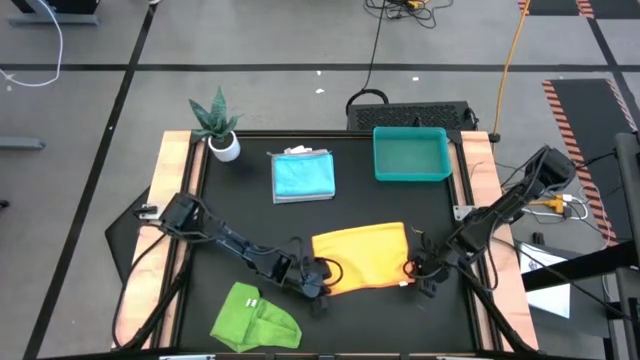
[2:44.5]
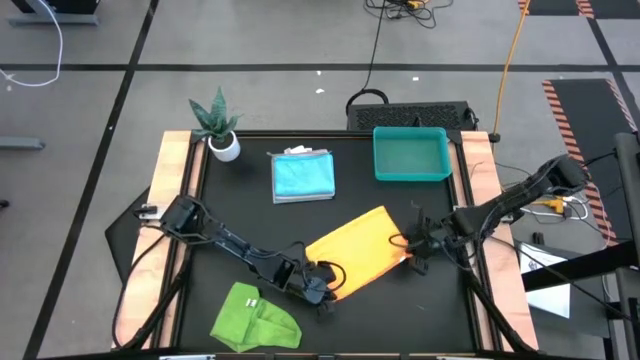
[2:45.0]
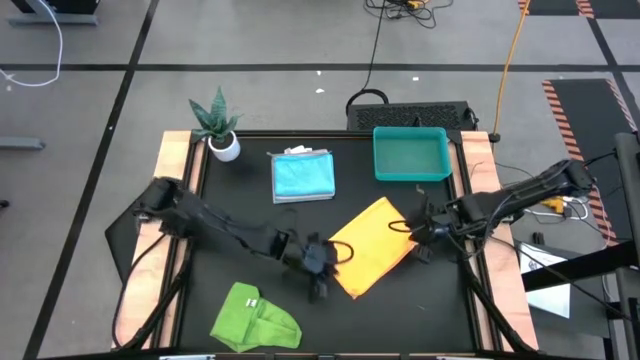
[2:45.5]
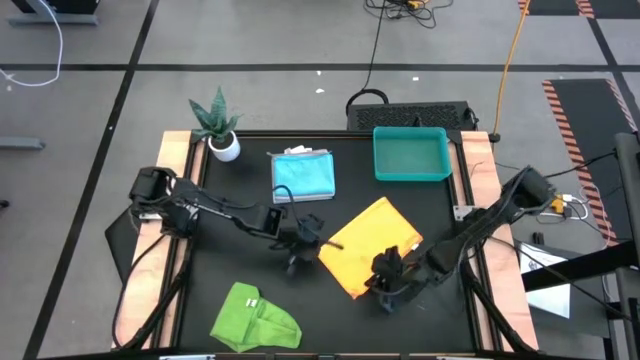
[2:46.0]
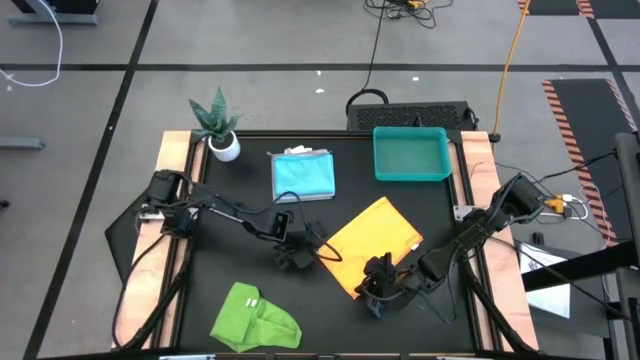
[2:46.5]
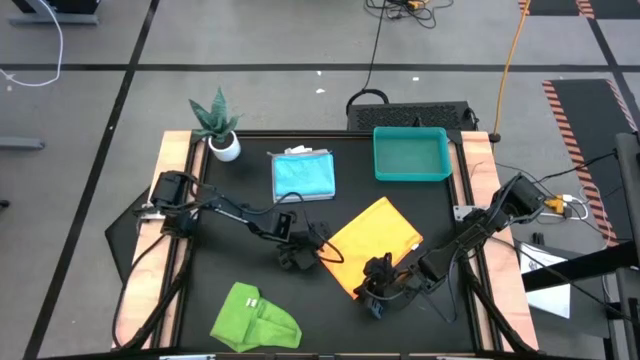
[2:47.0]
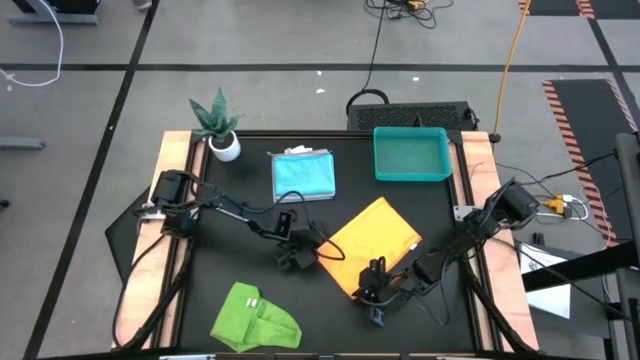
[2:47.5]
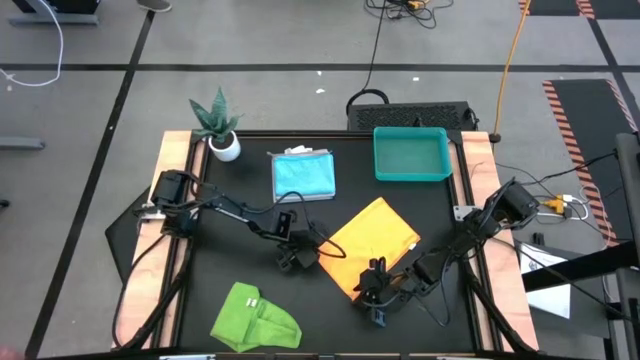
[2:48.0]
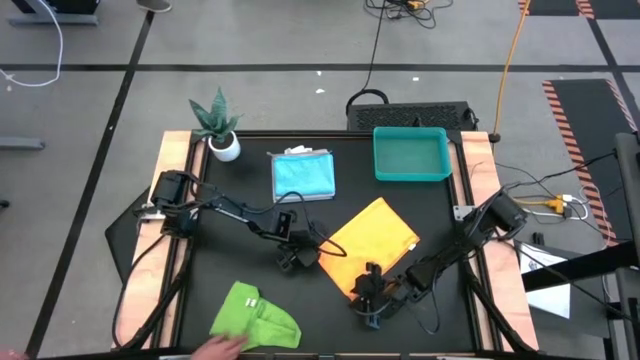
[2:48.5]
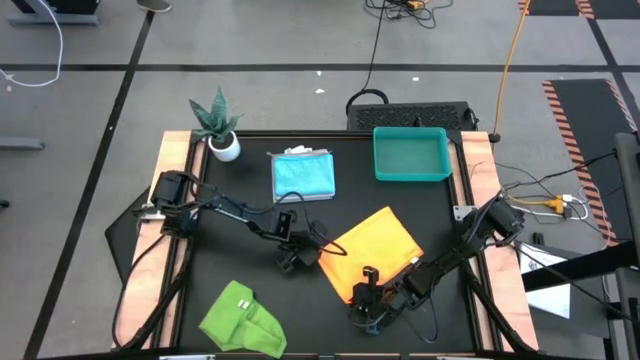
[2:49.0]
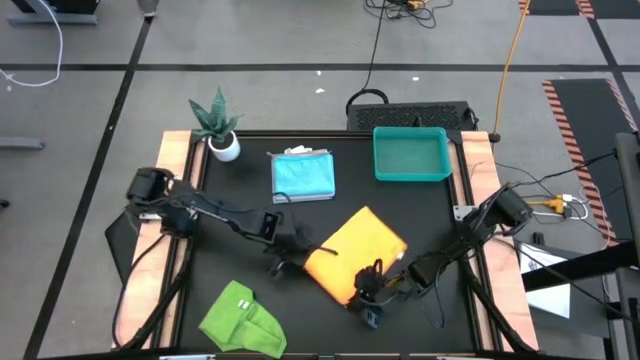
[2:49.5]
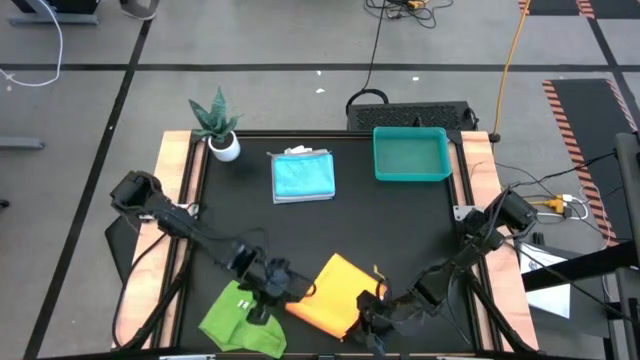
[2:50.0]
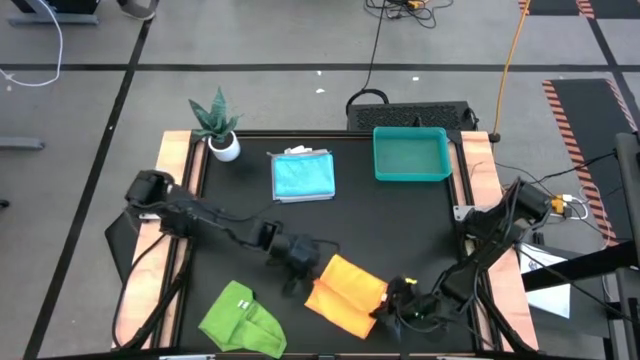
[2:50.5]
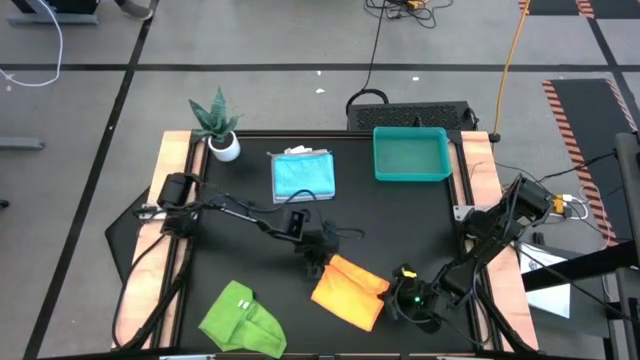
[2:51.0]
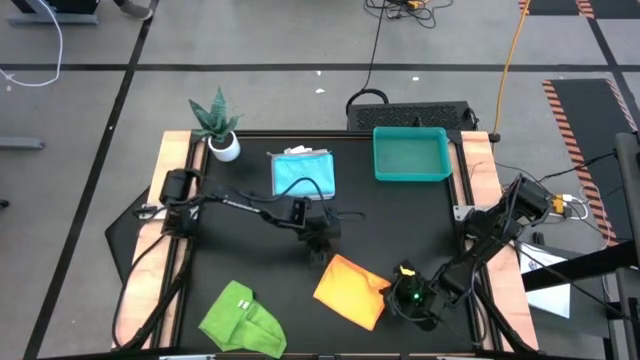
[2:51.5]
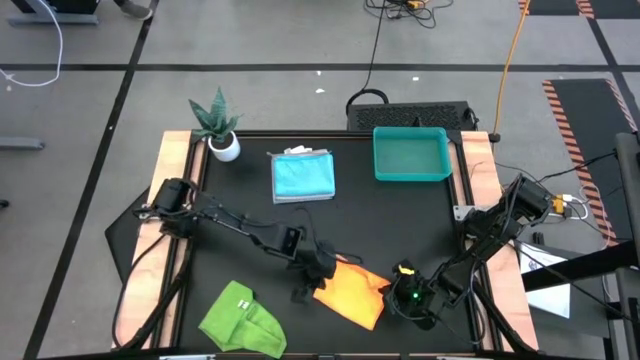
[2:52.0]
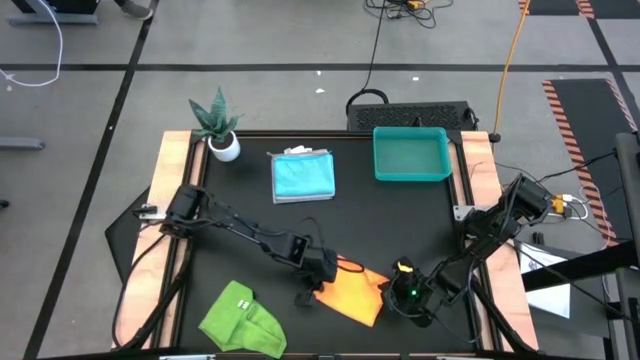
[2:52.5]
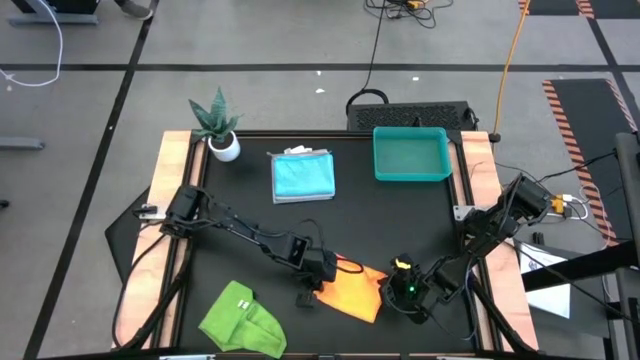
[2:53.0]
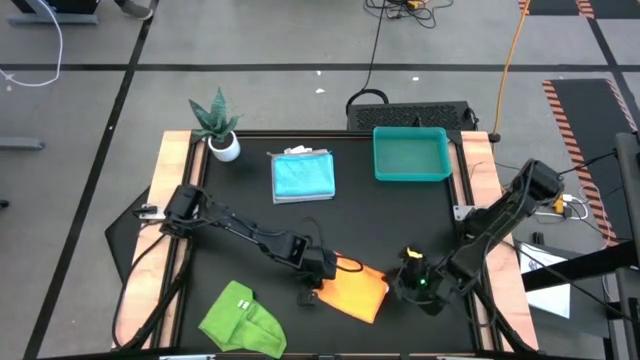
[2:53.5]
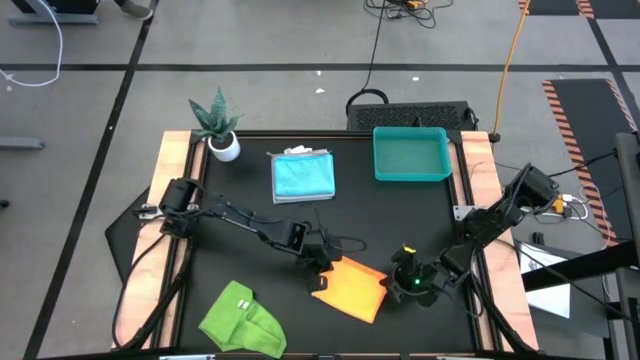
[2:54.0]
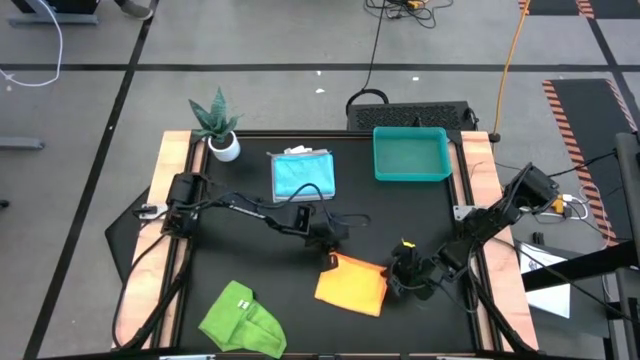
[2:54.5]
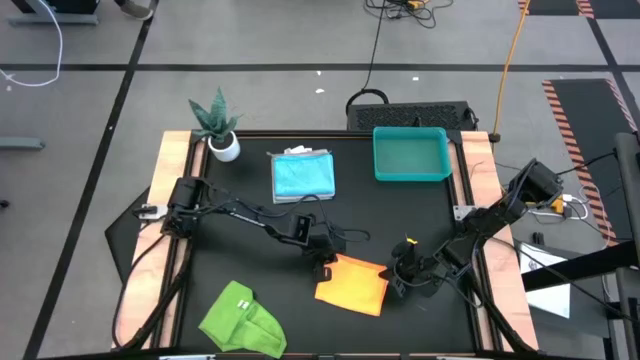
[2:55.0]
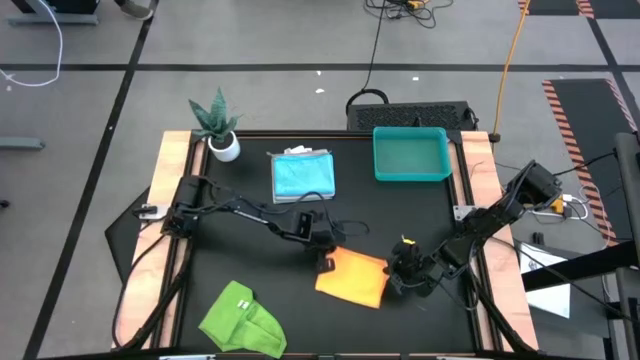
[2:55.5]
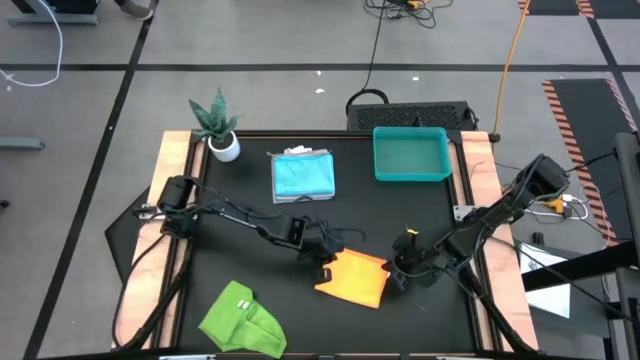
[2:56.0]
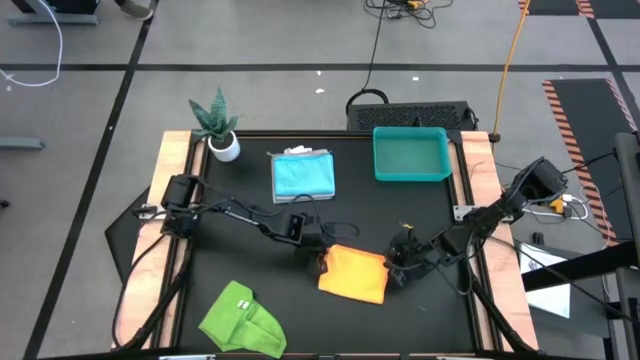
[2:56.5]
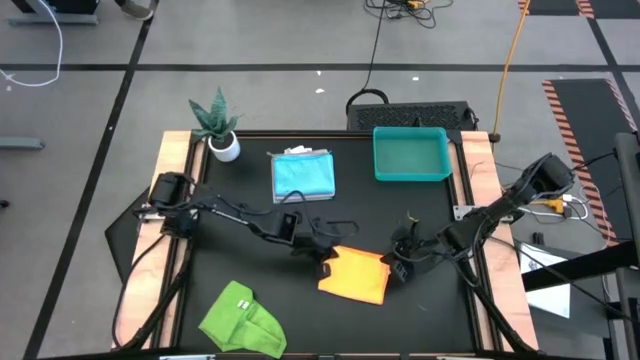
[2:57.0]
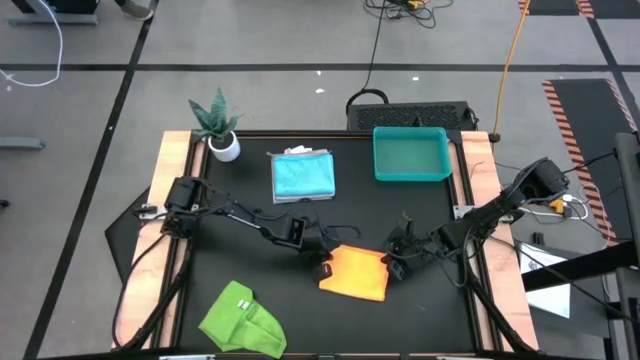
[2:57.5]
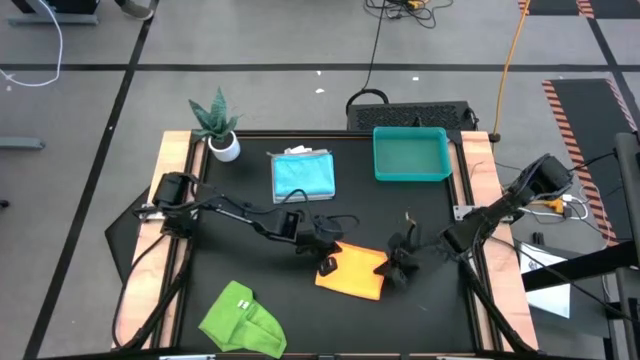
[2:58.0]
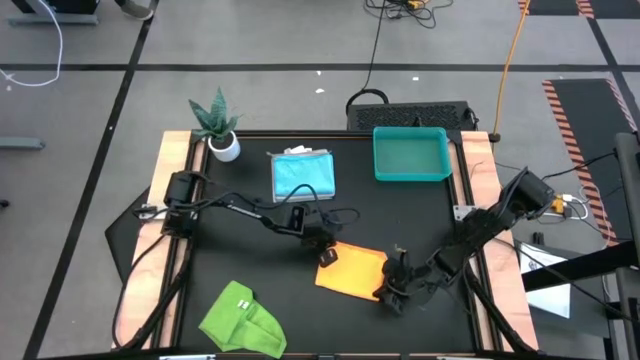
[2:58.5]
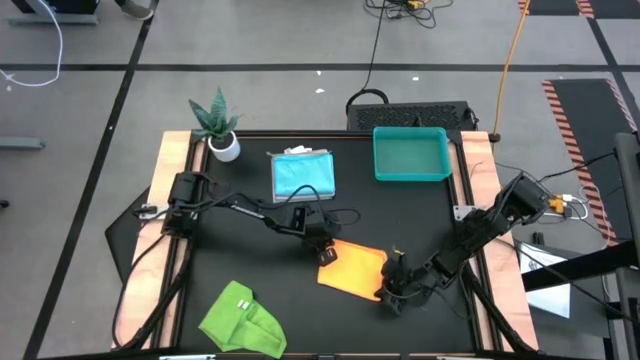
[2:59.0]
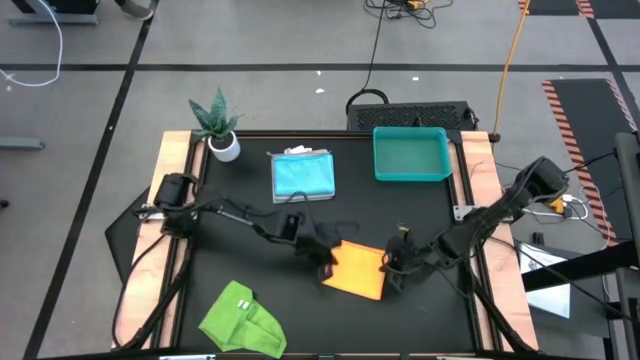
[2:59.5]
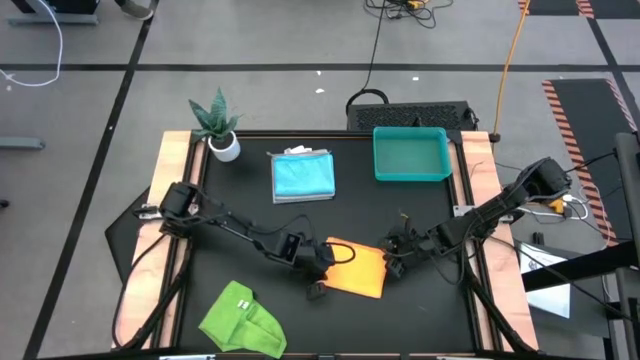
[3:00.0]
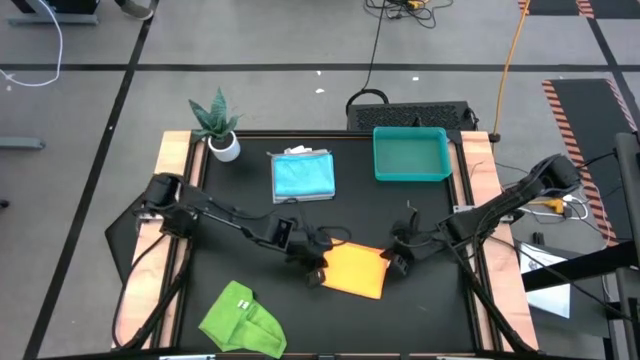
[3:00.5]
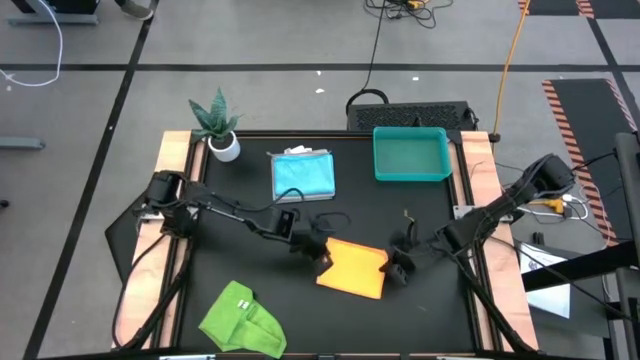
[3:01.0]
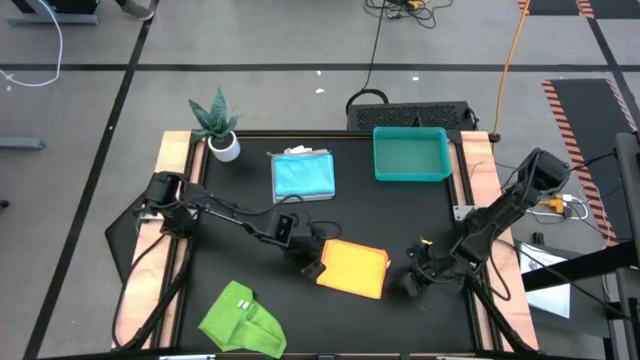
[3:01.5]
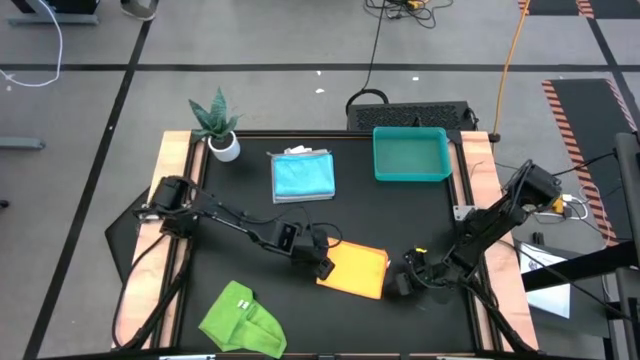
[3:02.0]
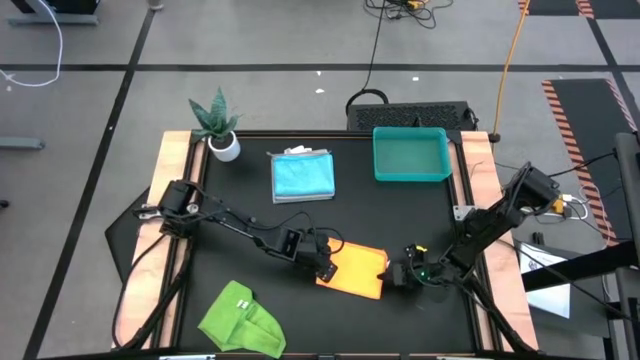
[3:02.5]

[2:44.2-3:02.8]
Task: Fold microfiber towels
Fold the yellow microfiber towel

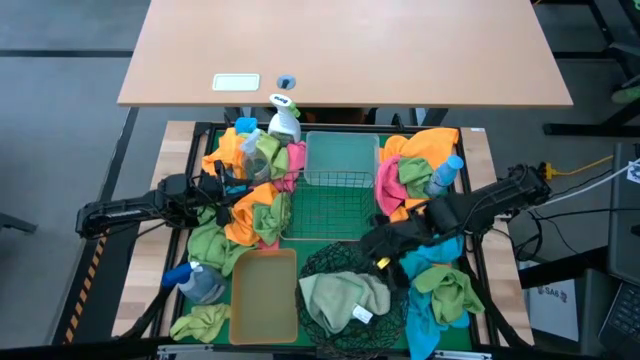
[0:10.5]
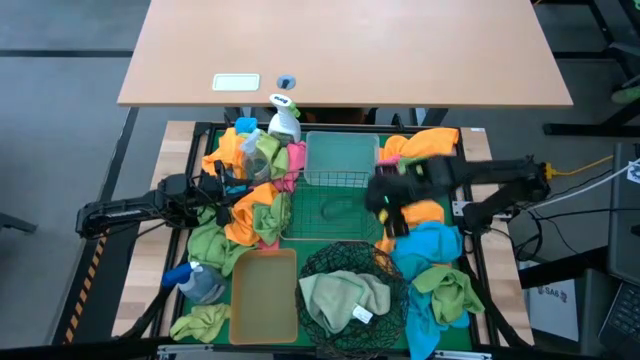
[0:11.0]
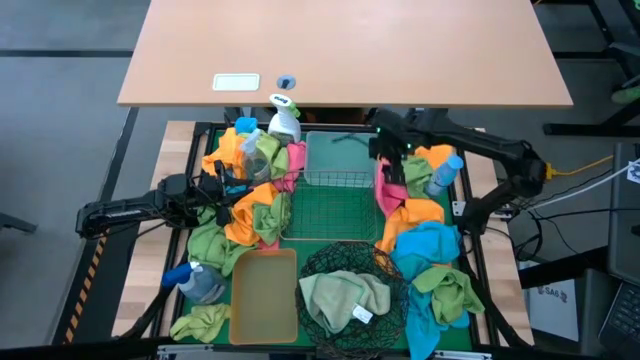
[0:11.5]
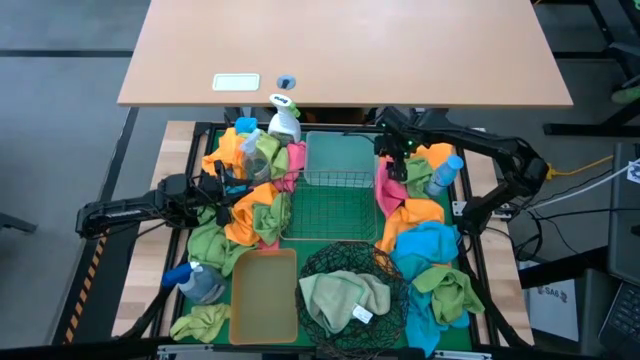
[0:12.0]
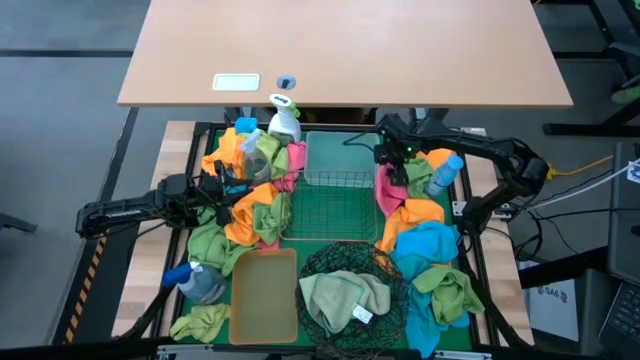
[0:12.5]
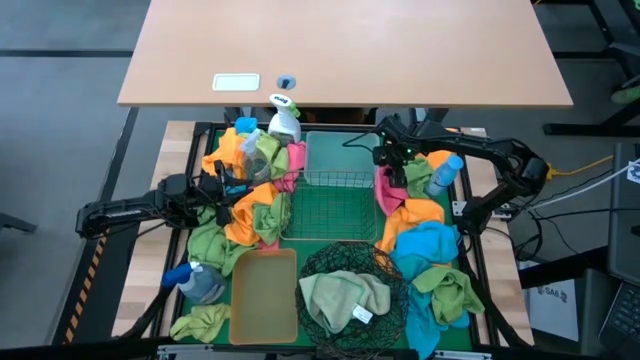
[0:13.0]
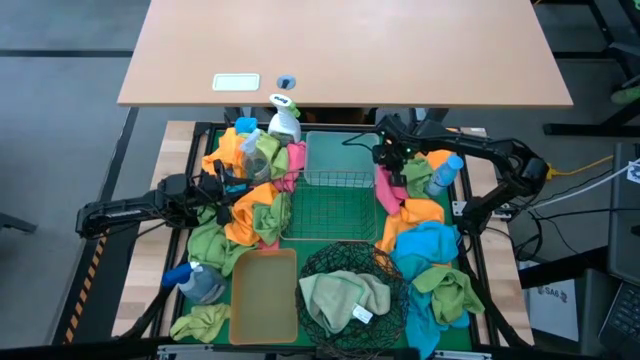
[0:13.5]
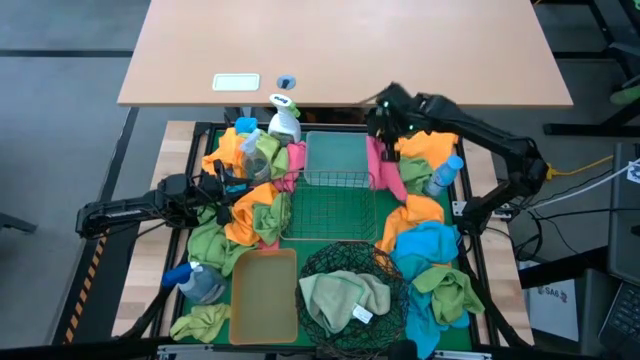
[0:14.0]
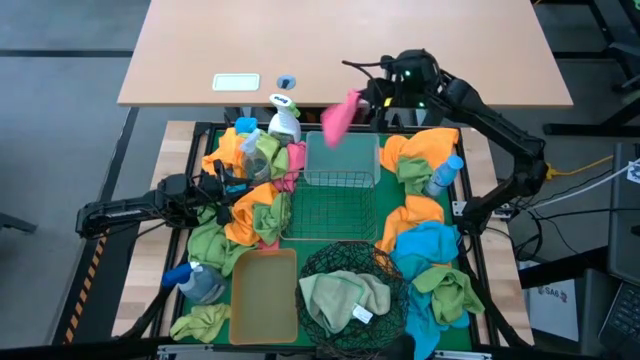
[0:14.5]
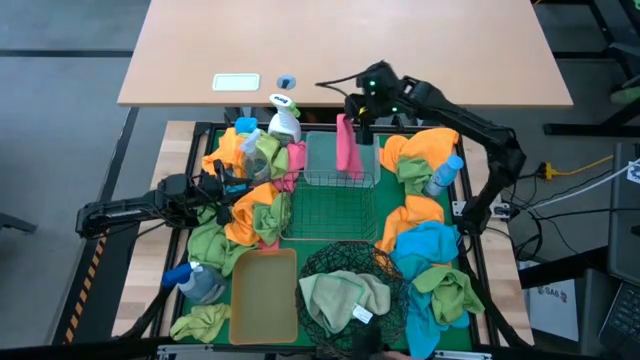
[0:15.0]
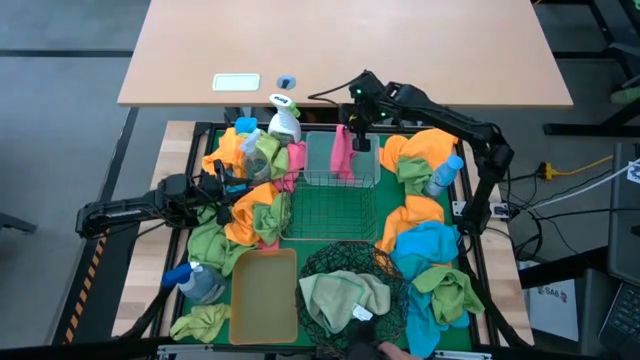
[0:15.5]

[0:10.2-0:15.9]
Task: Sort microfiber towel by color & place in baskets
Put the pink microfiber towel into the transparent bin
